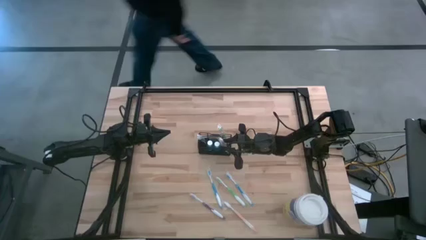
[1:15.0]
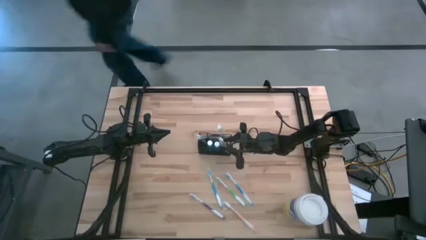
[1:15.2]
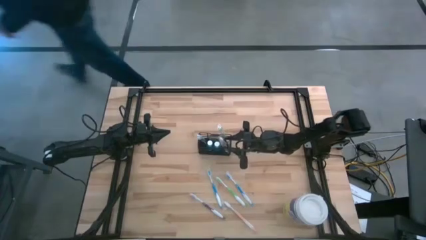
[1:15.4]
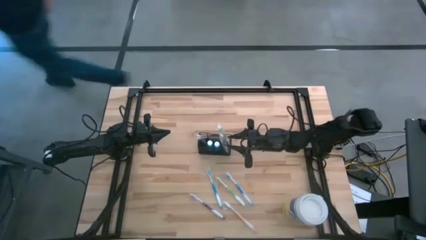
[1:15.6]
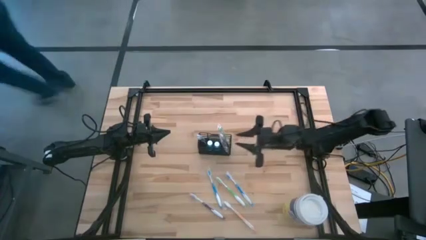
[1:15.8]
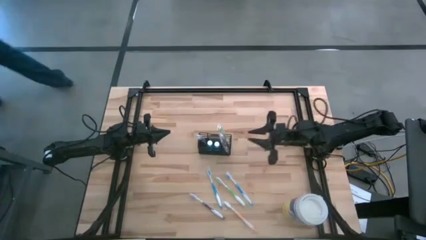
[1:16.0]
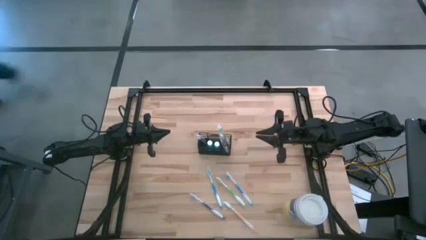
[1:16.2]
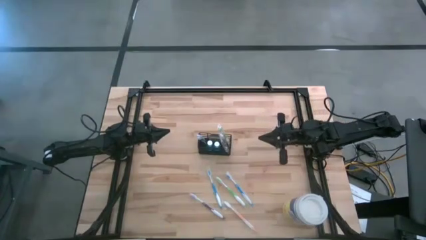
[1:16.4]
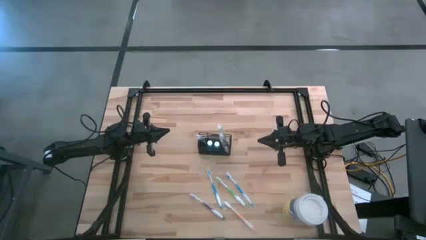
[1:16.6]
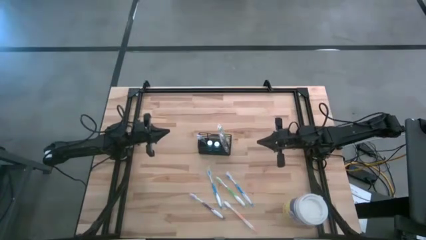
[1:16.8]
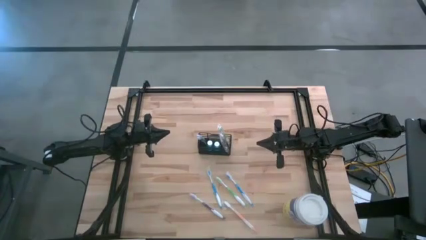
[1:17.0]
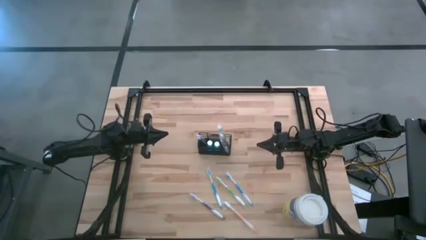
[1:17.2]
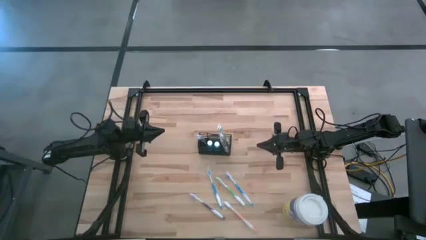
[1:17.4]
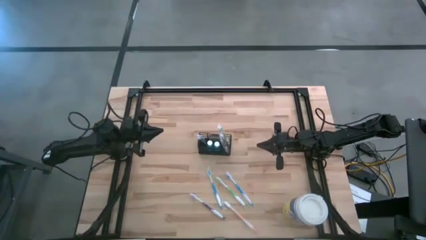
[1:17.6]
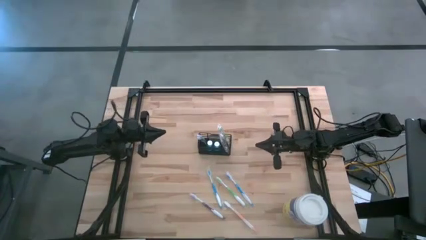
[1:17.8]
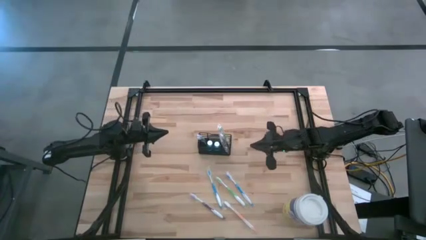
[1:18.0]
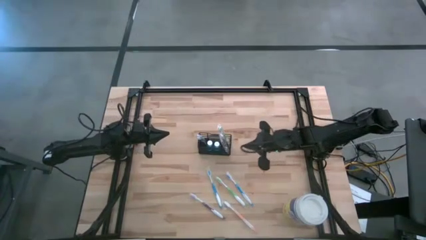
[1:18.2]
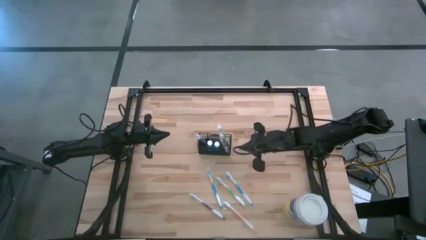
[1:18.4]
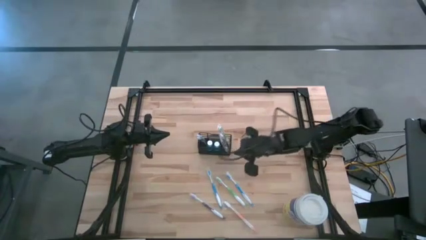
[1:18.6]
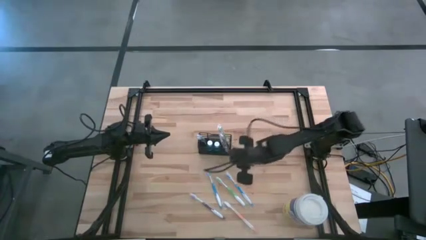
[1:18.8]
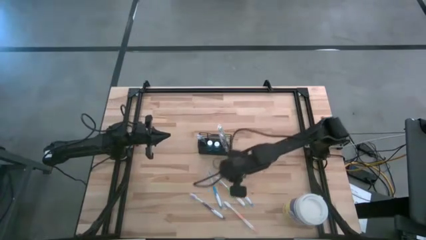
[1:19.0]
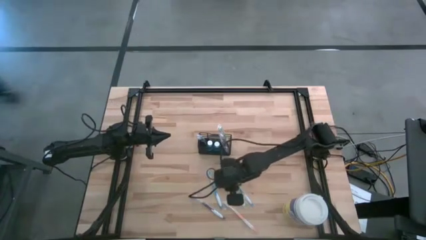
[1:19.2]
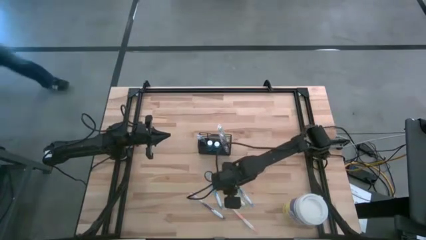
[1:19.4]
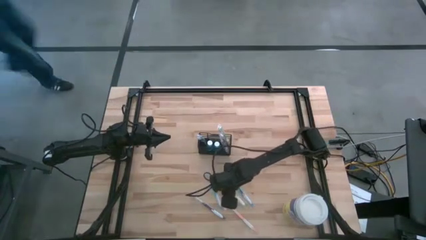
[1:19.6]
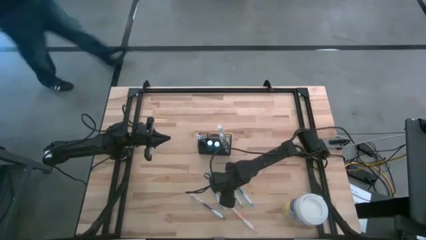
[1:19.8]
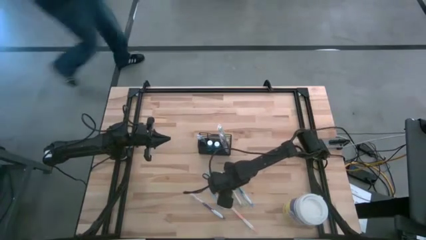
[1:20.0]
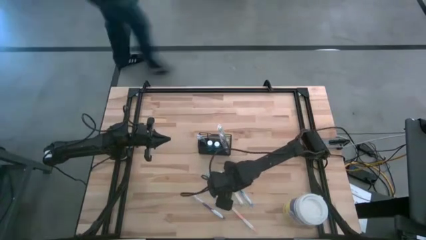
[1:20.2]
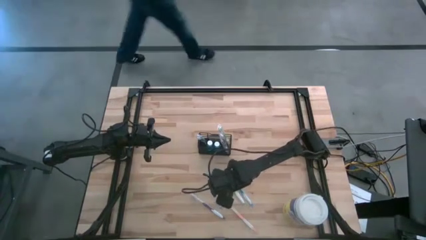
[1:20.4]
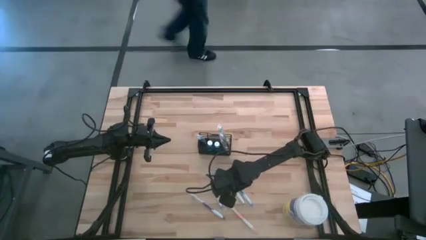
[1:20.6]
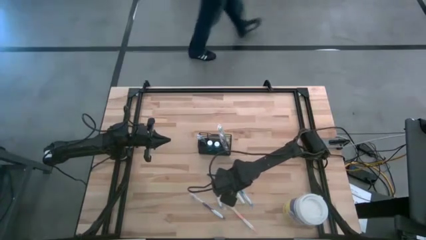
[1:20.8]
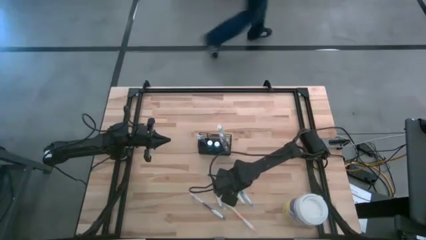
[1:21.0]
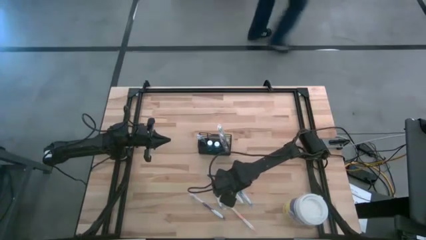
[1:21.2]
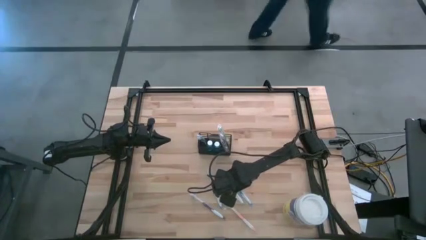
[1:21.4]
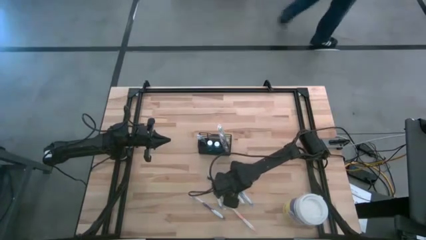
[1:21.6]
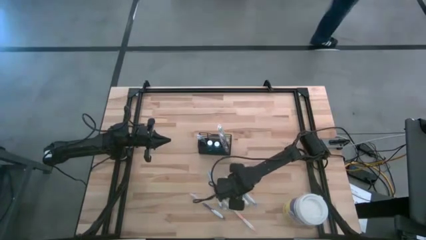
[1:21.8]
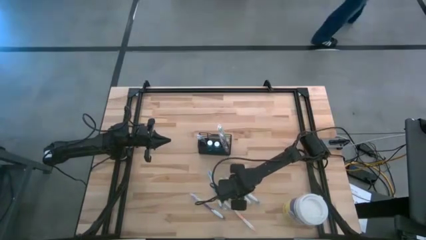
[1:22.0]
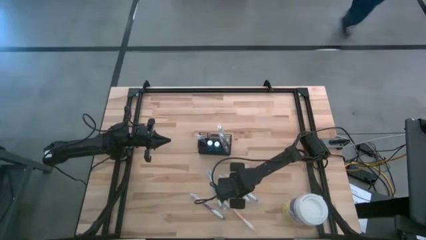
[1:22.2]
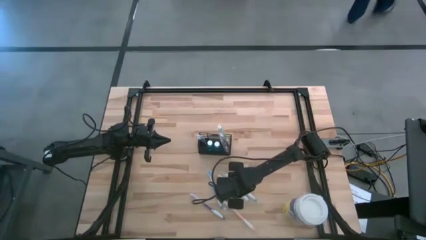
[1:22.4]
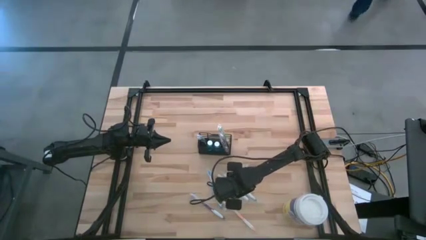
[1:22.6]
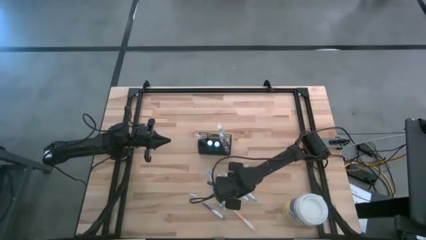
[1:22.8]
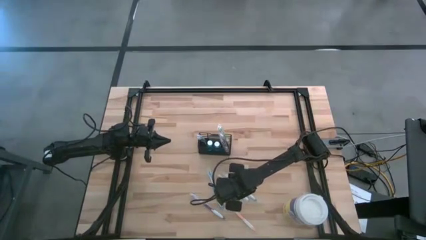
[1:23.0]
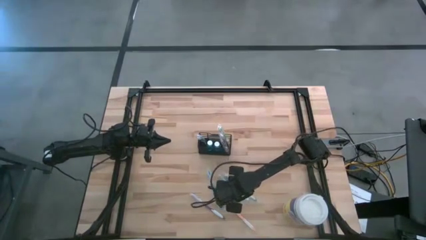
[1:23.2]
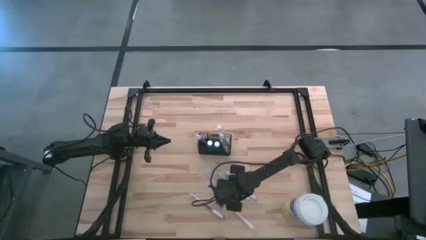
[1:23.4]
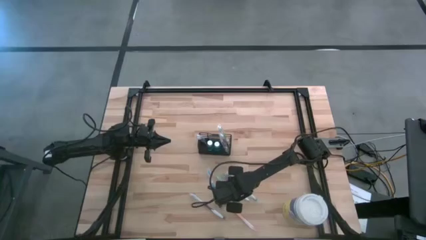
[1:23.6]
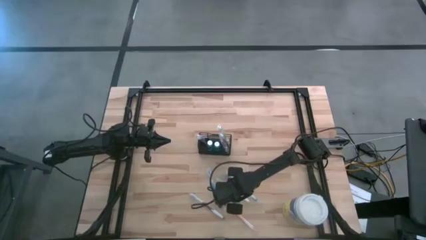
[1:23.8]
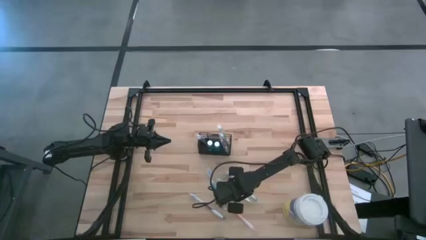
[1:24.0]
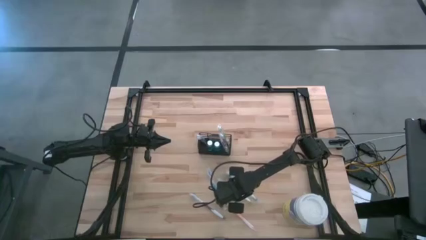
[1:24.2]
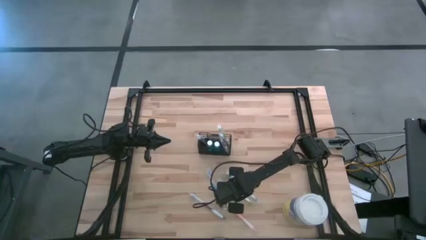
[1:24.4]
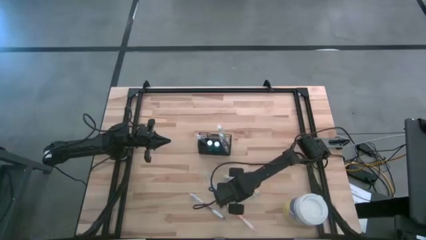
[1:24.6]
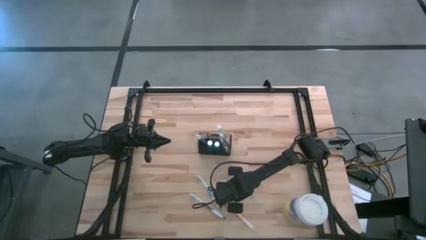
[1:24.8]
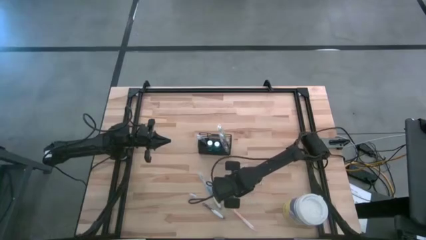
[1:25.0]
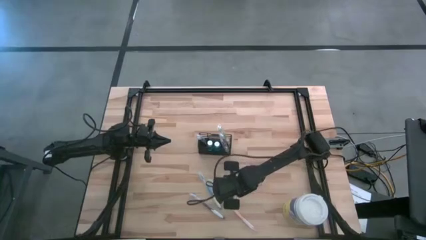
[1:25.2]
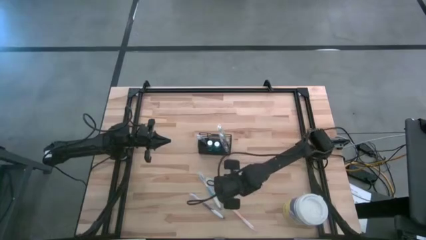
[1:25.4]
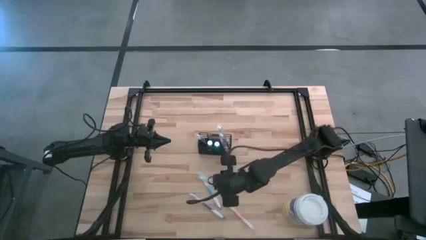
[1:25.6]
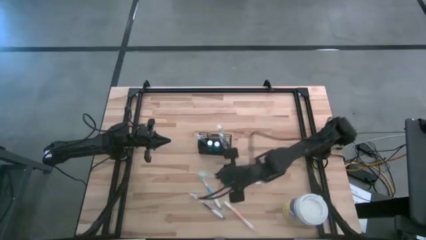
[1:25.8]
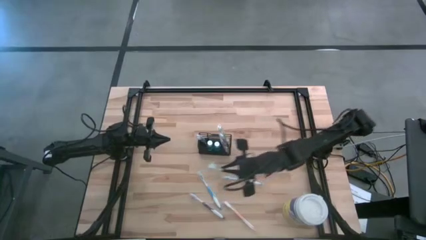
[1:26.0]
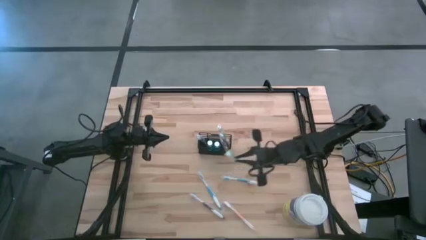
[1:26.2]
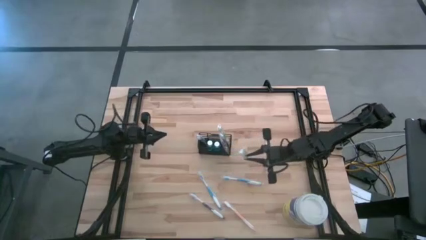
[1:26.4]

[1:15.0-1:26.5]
Task: Pick & Place toothbrushing station
Put the green toothbrush into the black wire organizer
